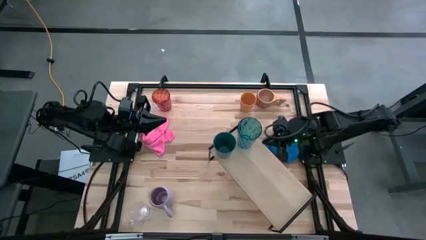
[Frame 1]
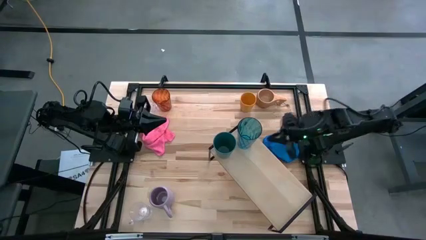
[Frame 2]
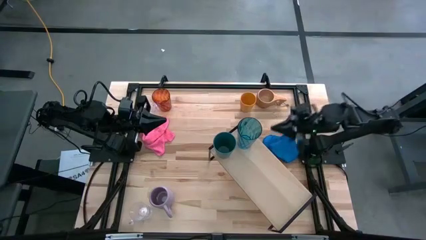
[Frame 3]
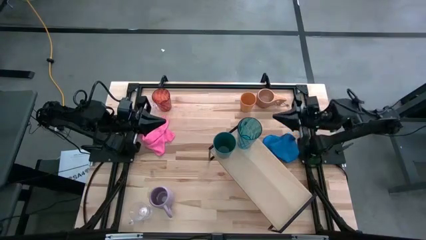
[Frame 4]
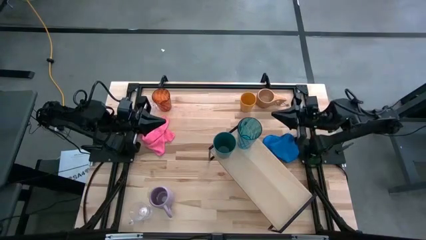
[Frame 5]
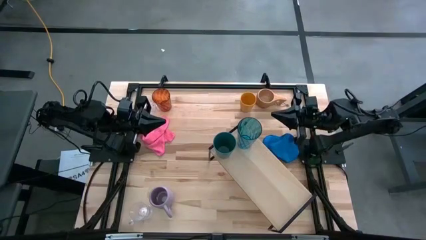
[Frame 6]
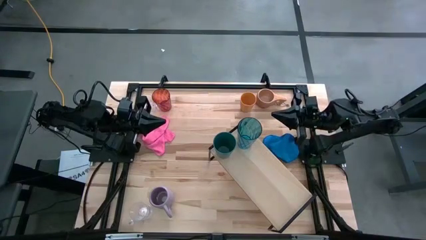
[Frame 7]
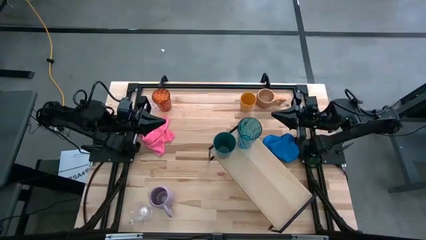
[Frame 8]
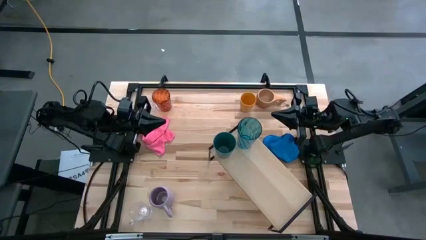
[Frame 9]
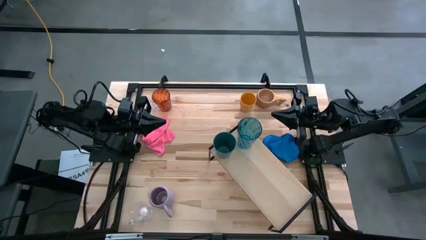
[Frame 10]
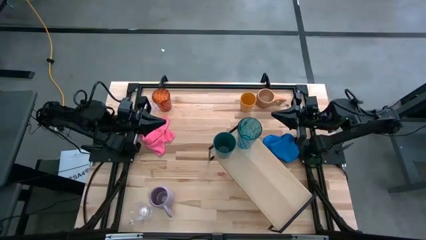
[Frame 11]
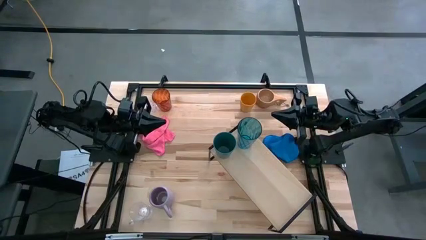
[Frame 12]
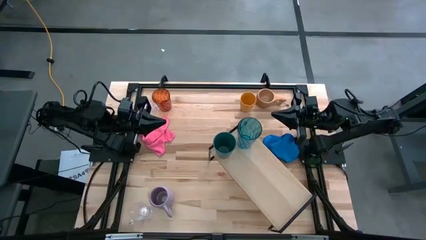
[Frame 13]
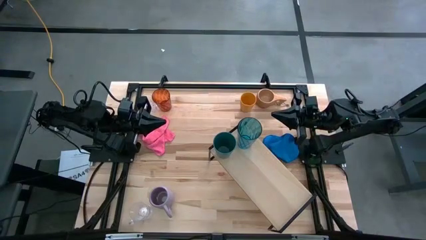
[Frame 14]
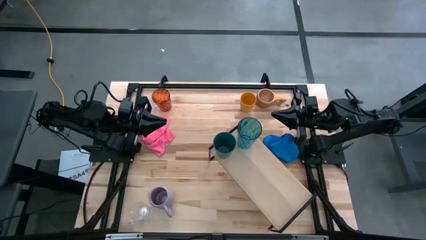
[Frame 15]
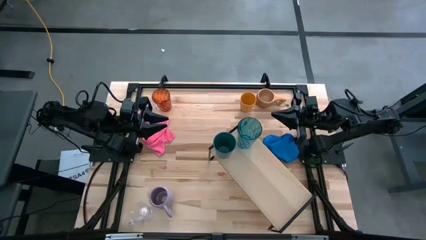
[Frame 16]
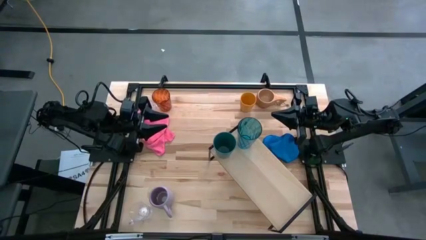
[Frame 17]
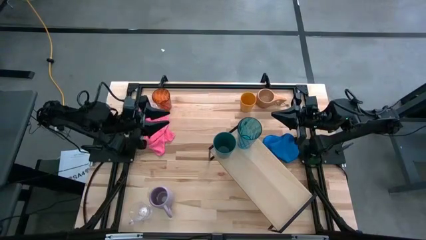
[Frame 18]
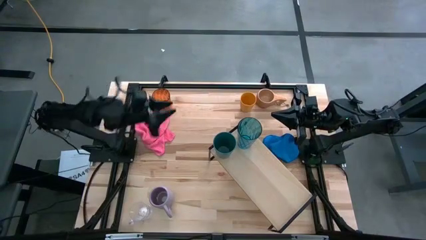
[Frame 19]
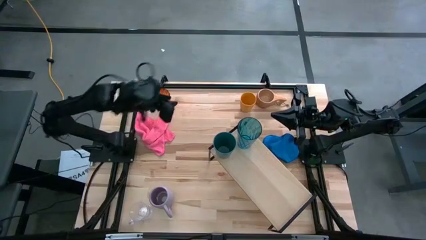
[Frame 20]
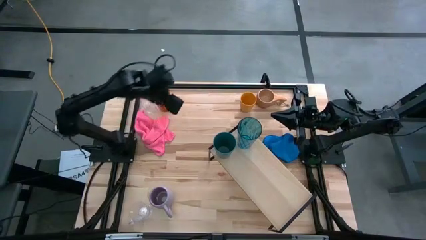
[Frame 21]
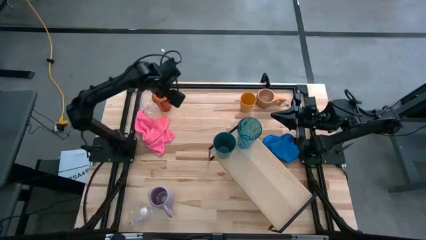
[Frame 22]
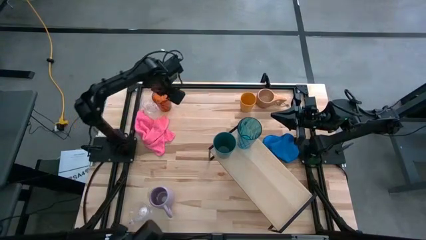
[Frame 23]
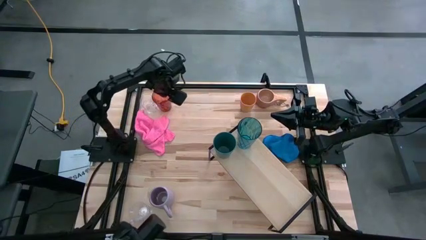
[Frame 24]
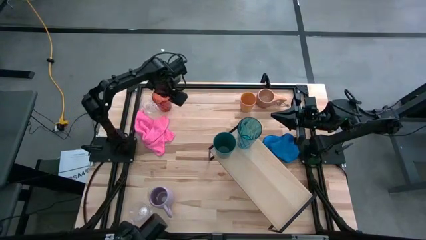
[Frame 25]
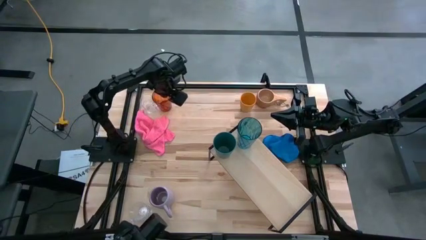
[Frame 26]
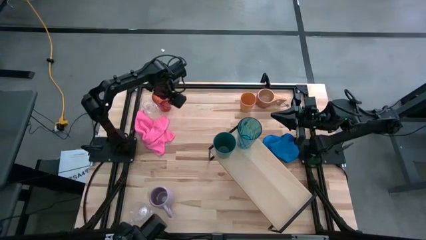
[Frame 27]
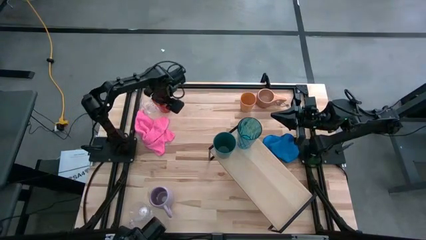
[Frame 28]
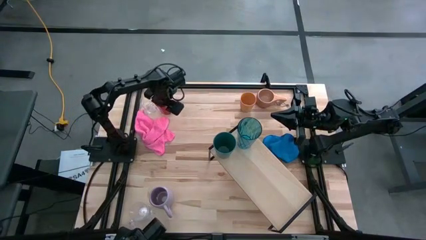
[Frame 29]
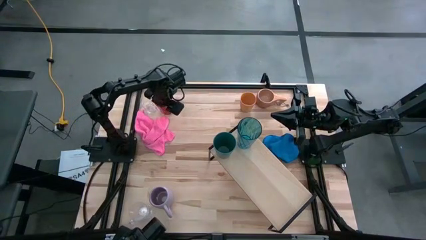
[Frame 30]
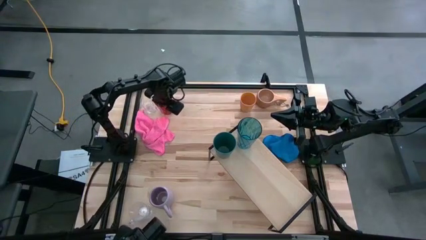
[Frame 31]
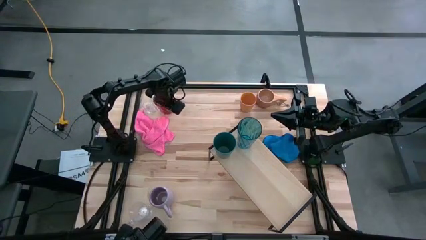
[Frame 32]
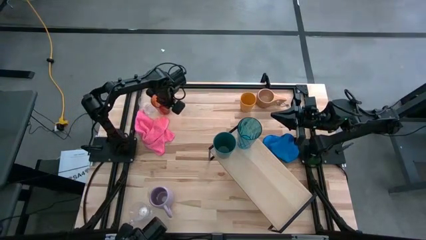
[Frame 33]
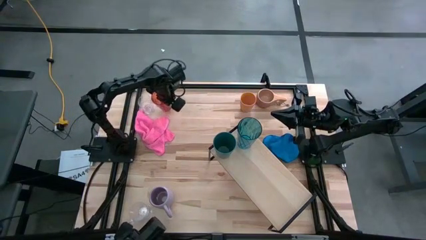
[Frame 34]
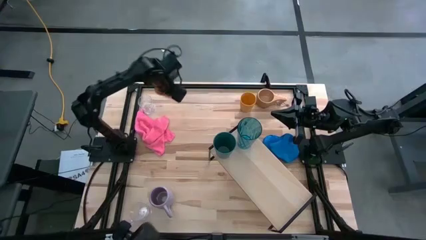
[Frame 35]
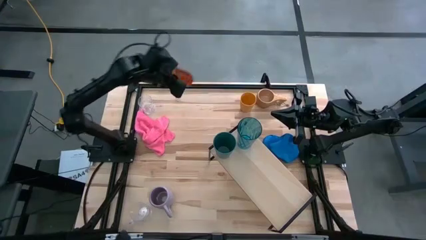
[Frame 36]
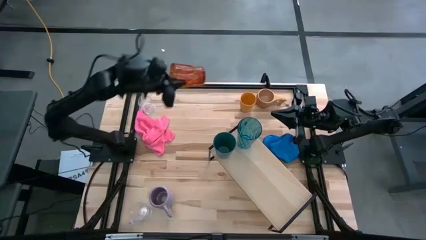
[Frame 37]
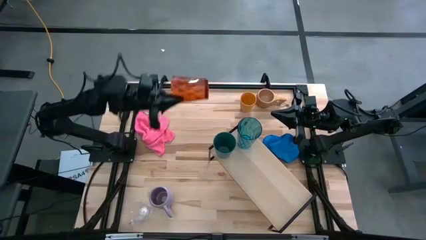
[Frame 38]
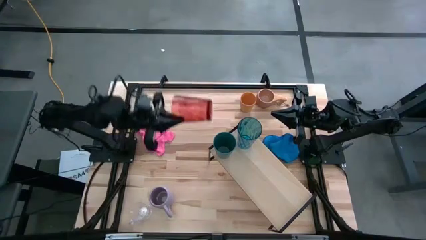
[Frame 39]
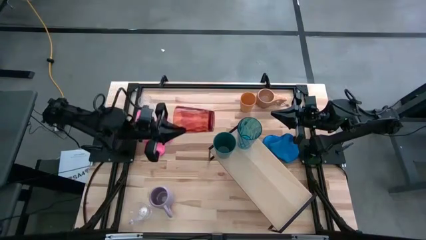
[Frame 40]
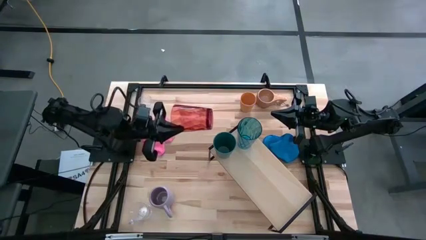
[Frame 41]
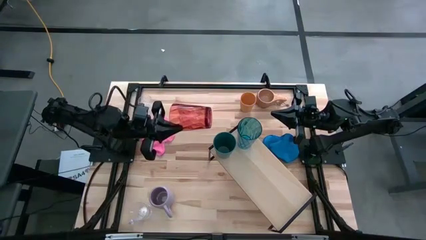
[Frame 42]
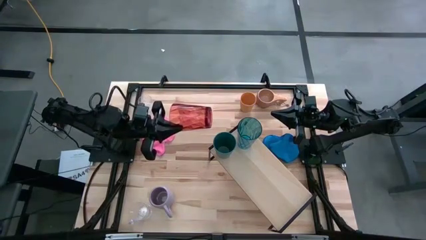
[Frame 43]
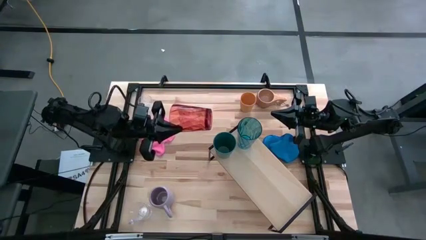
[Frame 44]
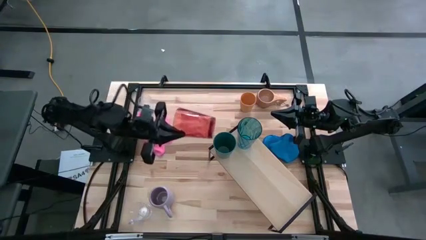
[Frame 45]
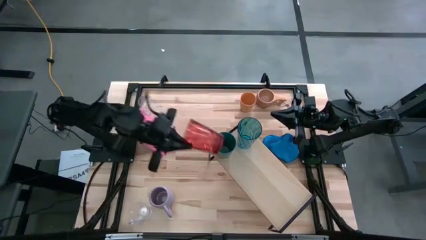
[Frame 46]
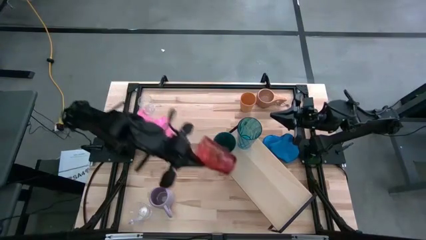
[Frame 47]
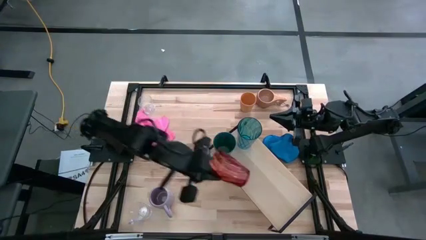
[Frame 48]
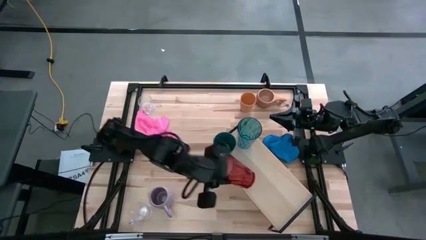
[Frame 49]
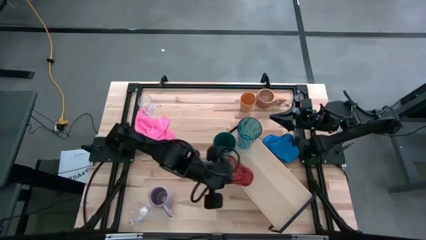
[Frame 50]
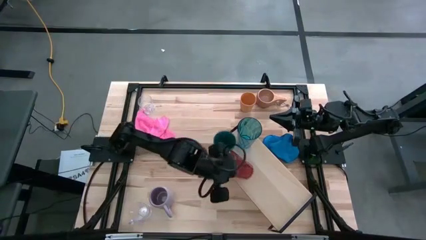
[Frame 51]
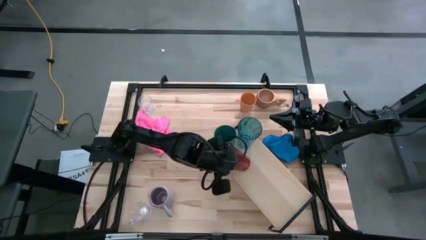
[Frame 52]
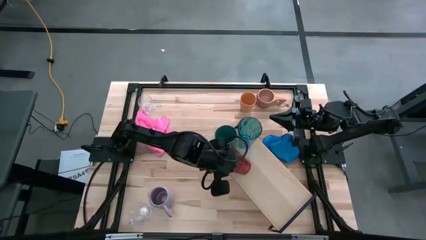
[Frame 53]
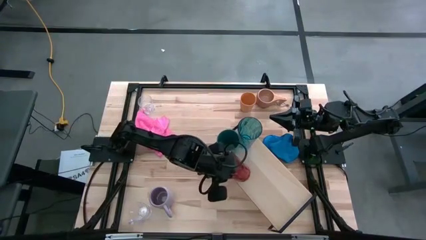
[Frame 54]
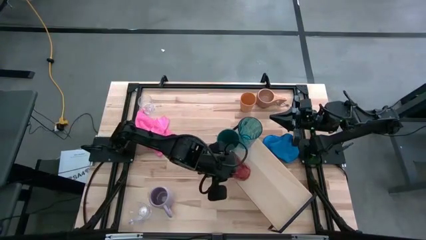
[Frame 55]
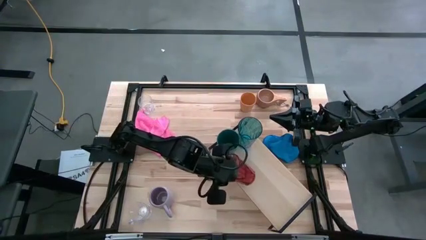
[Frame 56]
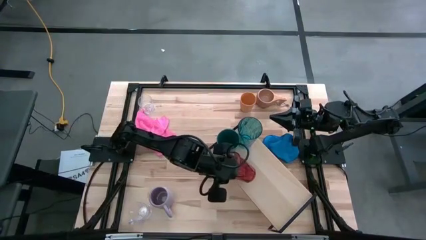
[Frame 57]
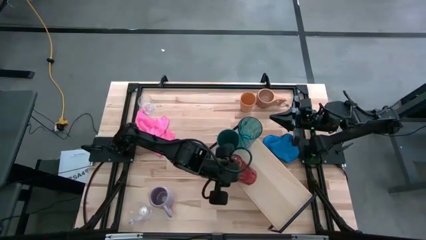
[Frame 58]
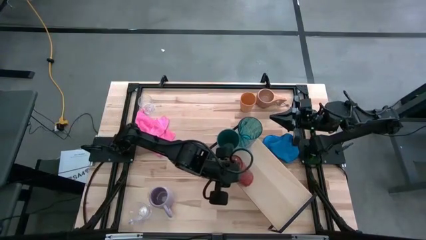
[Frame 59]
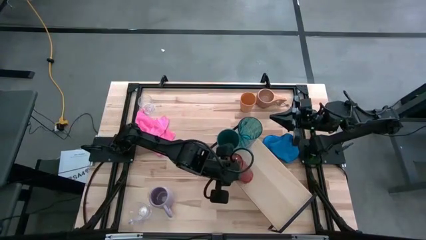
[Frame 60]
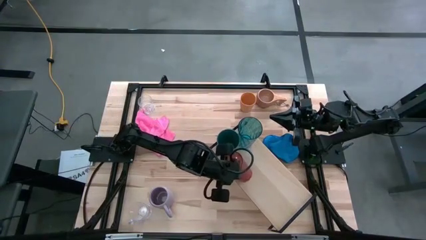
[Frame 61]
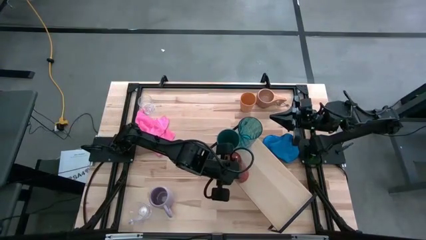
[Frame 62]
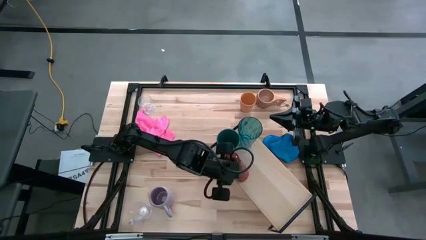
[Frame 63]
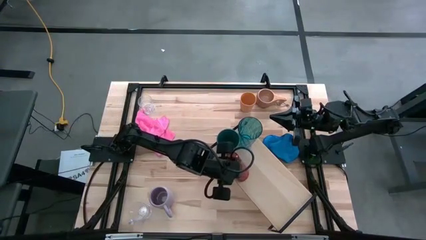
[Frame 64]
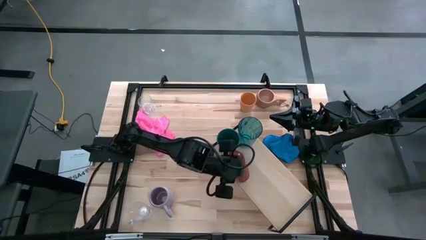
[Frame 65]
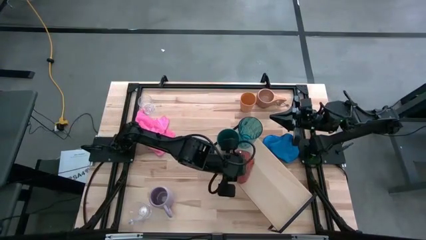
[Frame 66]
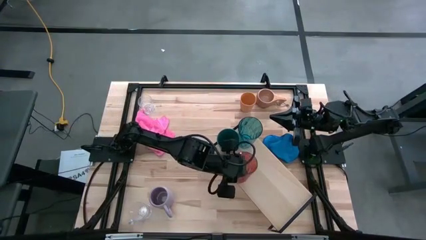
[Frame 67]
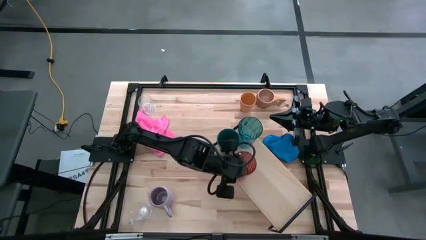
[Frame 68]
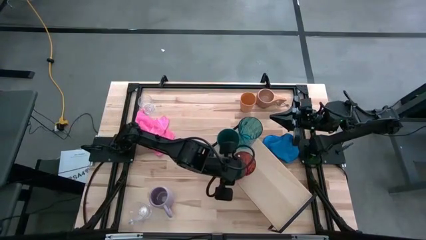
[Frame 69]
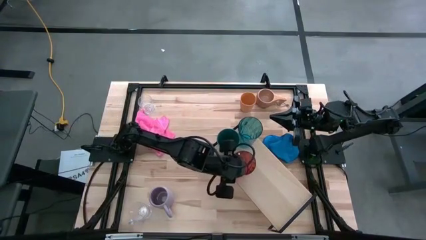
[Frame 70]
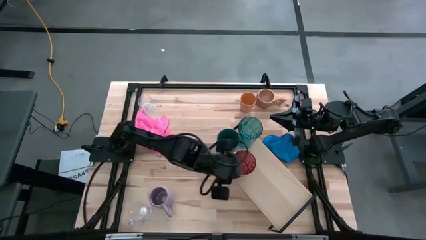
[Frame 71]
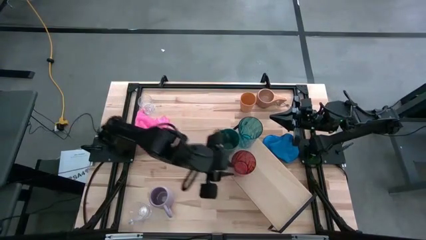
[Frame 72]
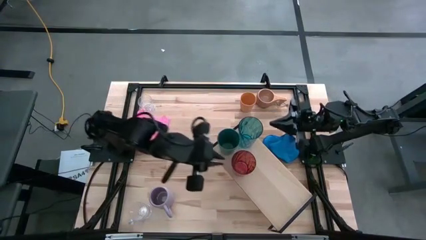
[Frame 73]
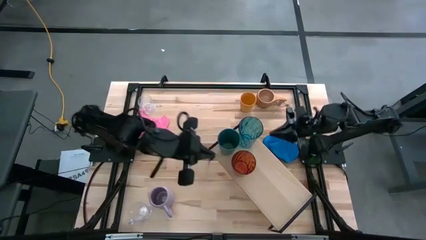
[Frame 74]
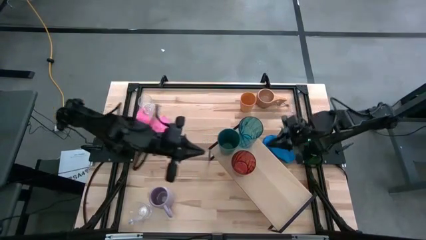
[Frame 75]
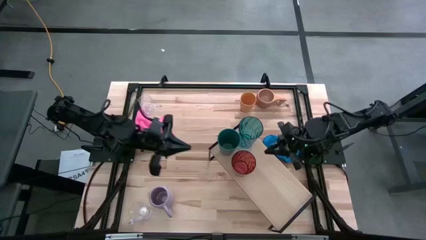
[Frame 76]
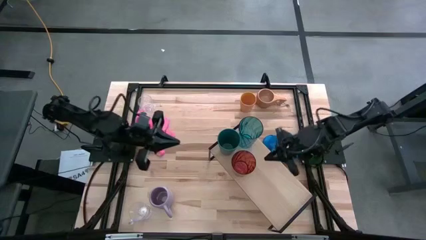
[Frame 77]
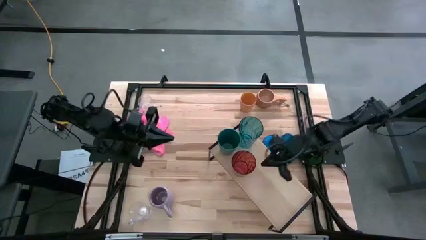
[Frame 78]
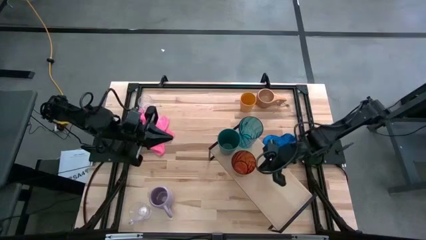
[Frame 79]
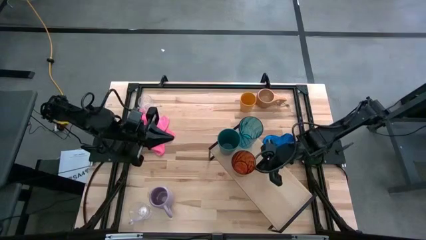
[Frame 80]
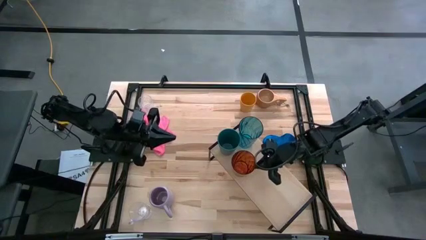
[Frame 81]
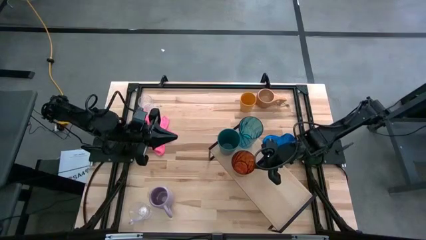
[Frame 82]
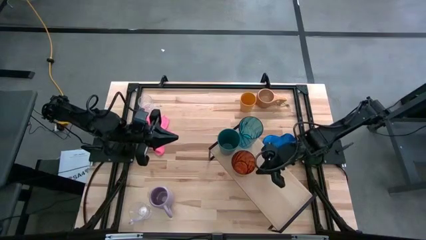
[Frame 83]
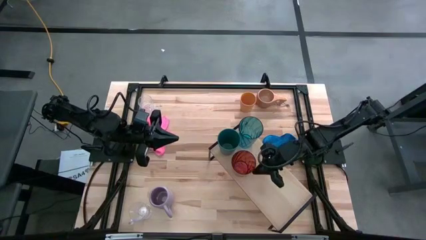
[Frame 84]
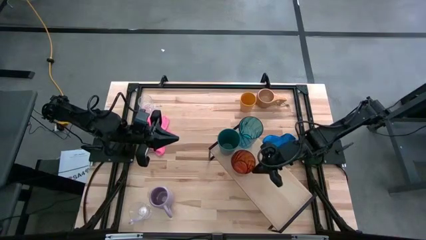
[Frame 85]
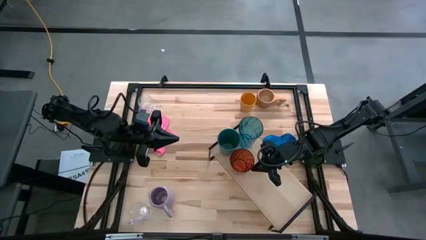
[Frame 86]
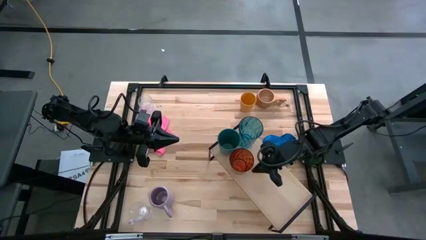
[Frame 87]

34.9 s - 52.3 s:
Task: Stack small to large cups/mugs on shelf
Put the red cup on the shelf
